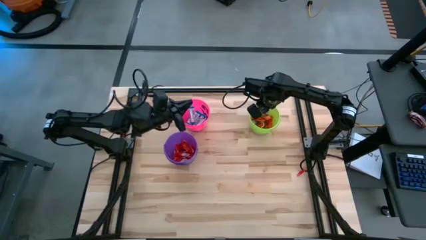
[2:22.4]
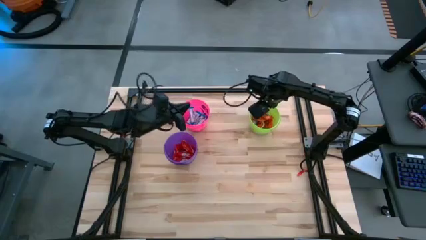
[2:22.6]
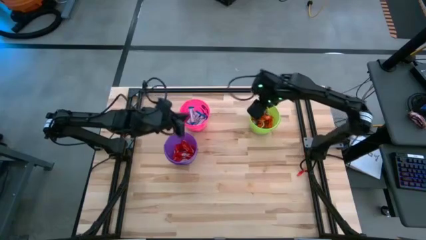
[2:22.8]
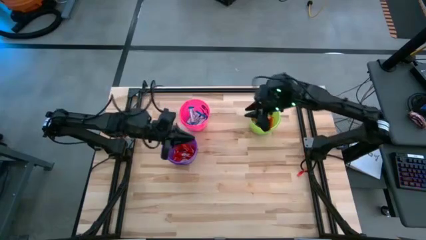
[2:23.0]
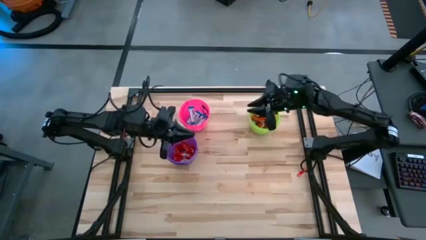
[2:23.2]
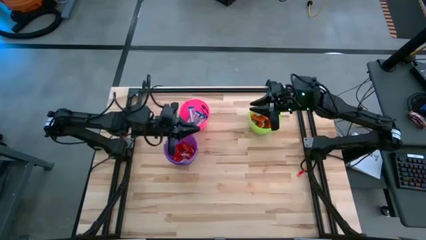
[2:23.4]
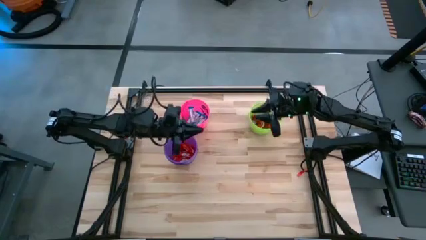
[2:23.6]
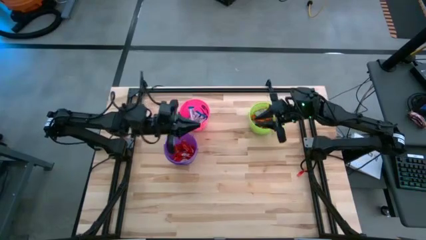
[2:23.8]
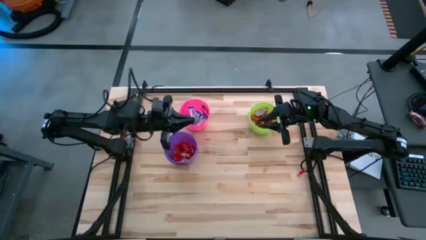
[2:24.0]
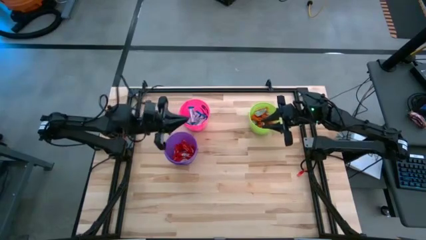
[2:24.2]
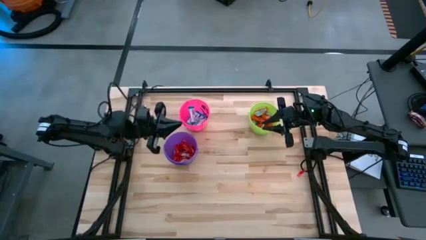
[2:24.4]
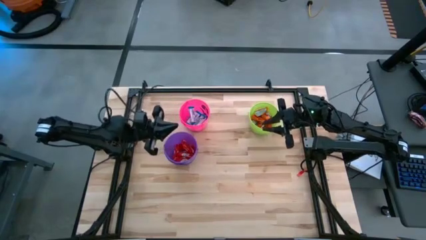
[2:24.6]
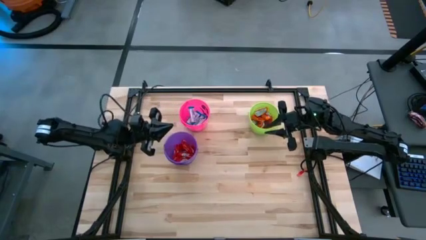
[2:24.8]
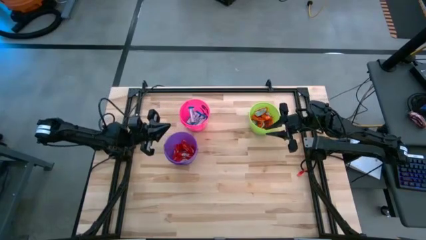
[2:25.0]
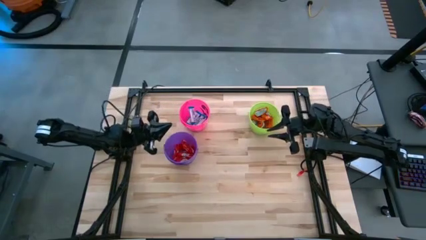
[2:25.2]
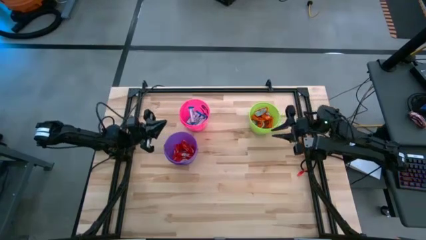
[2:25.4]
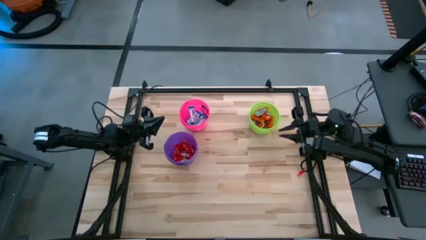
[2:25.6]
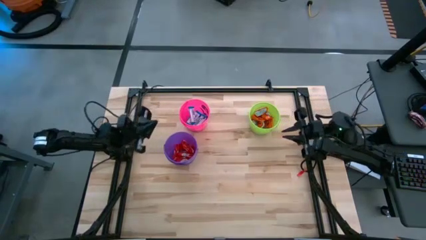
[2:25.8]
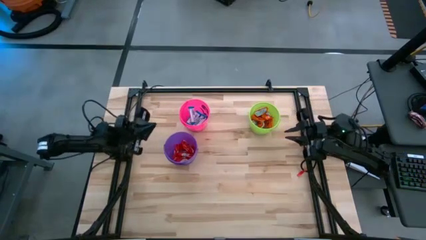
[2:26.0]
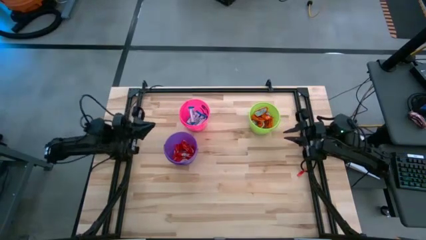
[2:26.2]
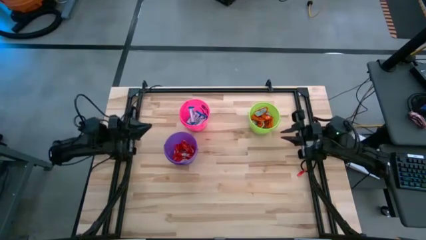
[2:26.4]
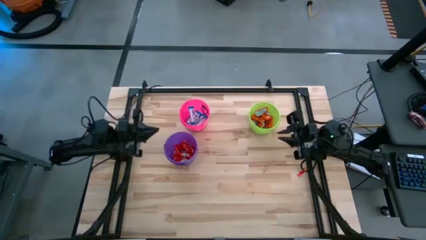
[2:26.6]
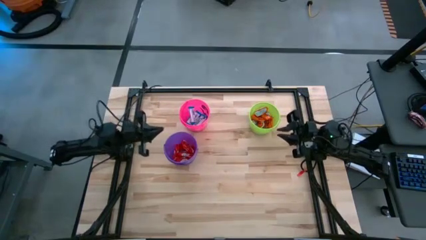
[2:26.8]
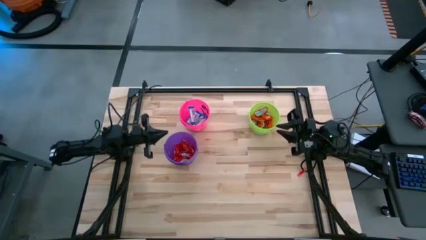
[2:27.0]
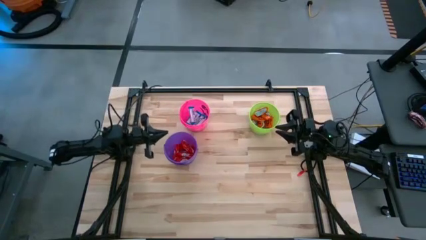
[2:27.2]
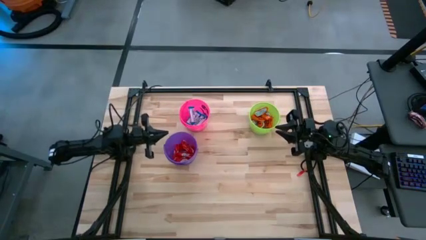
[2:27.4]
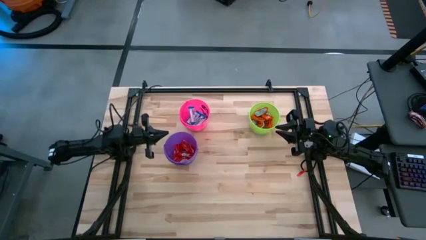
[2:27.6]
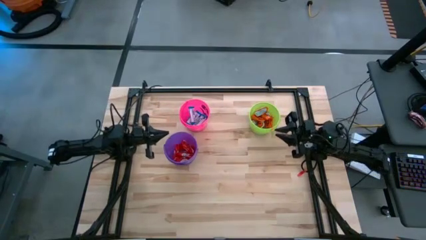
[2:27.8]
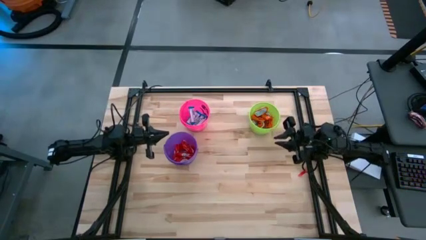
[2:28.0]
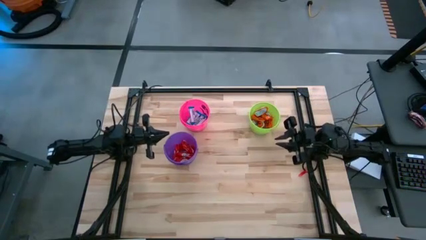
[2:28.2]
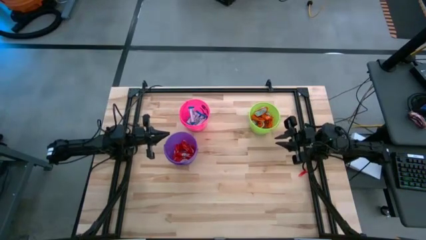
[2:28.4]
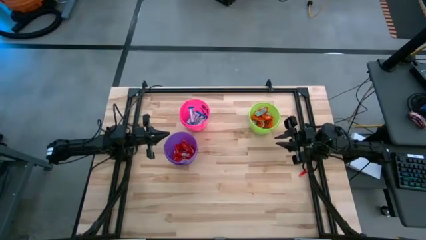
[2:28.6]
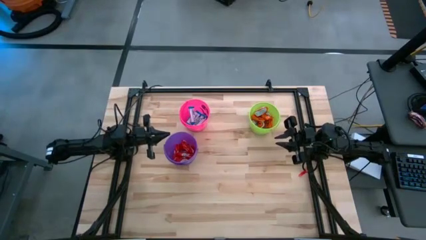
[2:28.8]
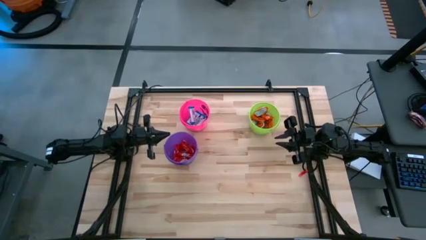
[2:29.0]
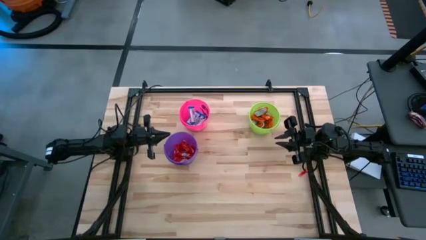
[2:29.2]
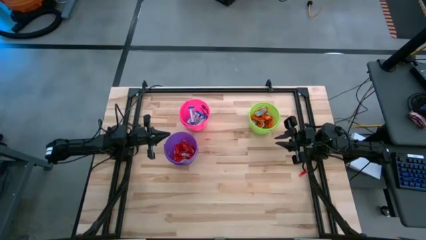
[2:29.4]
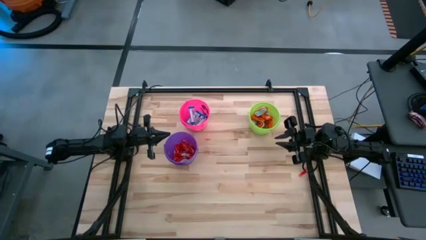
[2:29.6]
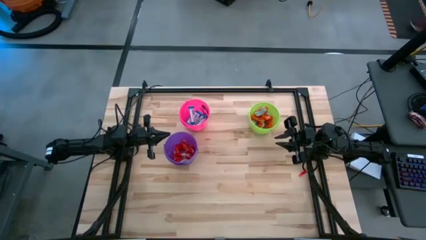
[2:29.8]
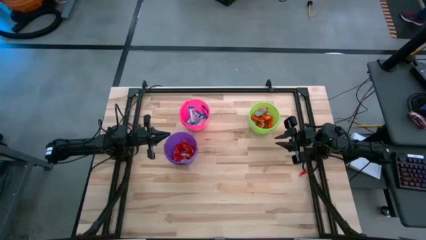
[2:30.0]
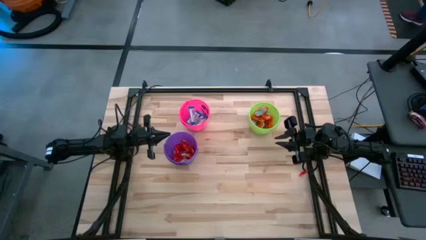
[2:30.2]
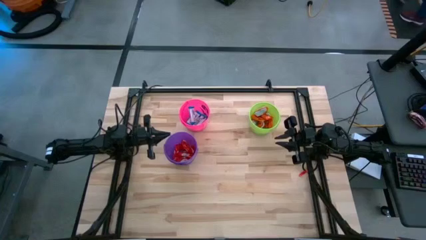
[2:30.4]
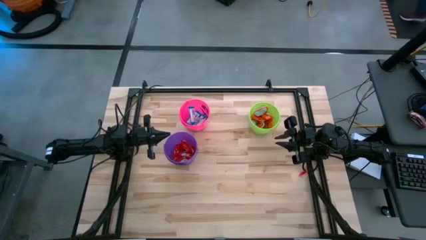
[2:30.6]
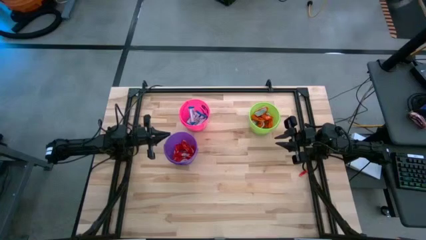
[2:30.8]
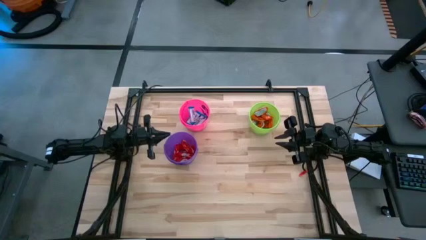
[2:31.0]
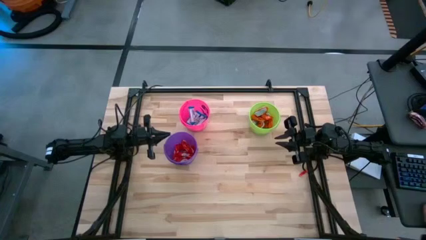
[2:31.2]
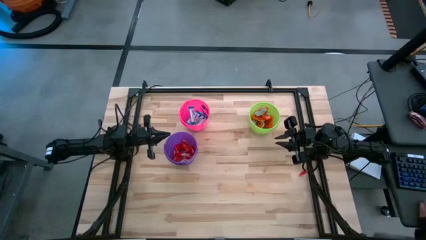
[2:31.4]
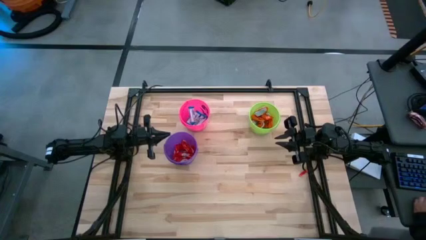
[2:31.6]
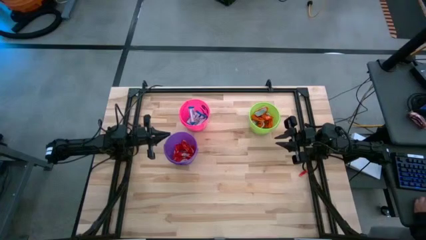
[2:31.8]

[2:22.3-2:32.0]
Task: Sort candy
Return to Home Position

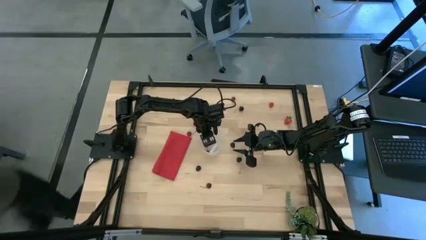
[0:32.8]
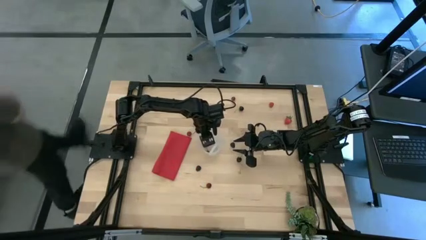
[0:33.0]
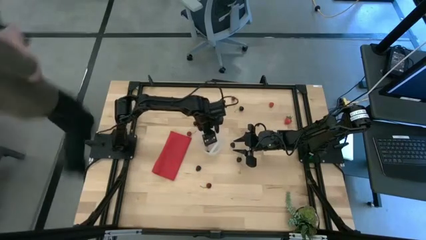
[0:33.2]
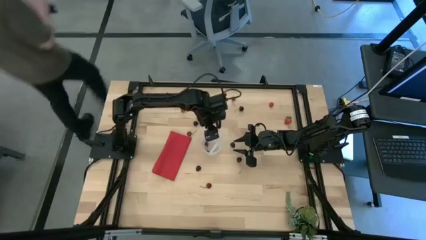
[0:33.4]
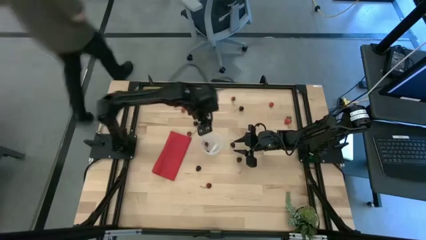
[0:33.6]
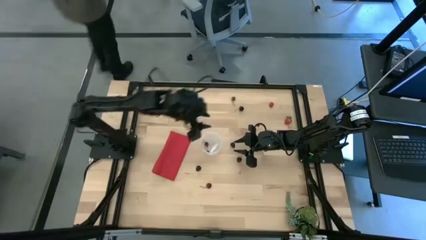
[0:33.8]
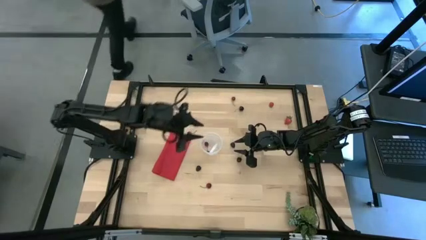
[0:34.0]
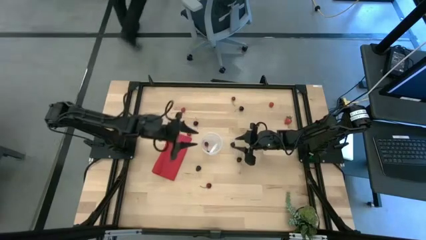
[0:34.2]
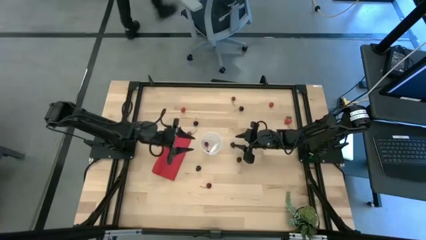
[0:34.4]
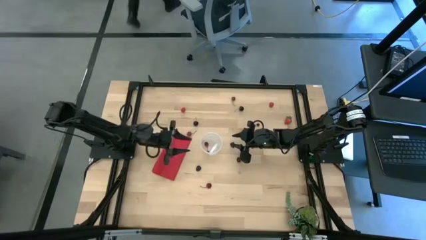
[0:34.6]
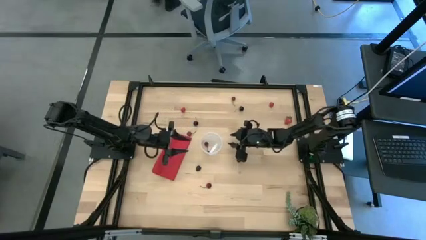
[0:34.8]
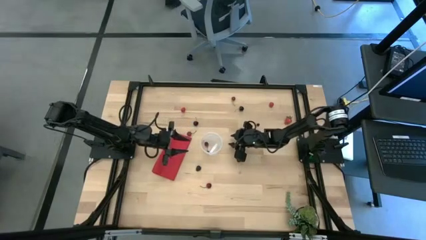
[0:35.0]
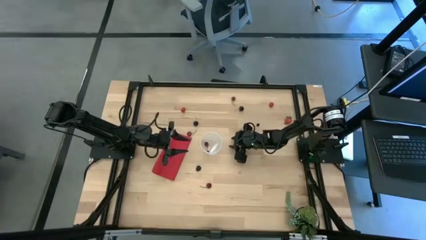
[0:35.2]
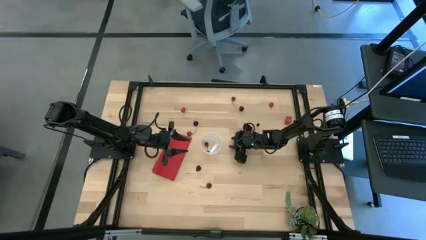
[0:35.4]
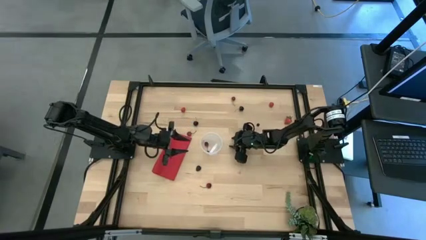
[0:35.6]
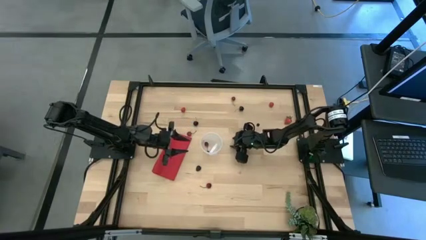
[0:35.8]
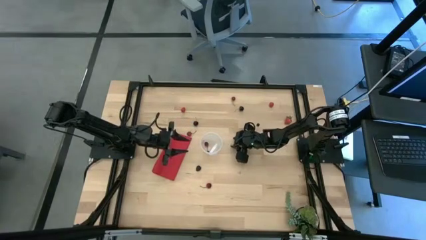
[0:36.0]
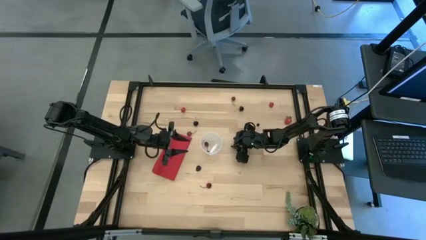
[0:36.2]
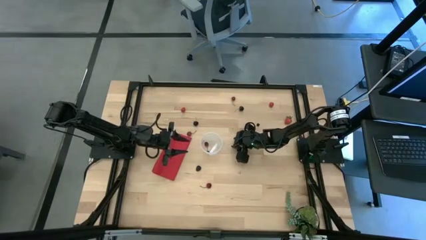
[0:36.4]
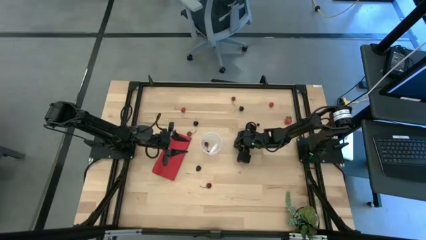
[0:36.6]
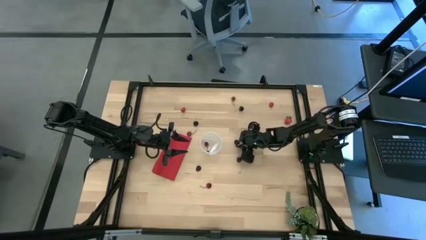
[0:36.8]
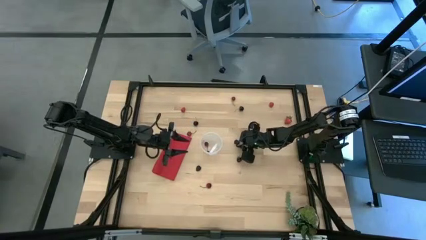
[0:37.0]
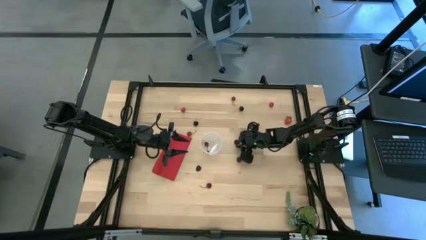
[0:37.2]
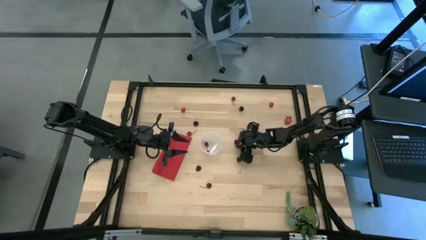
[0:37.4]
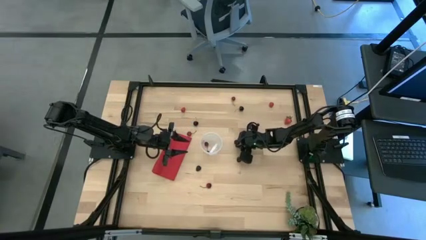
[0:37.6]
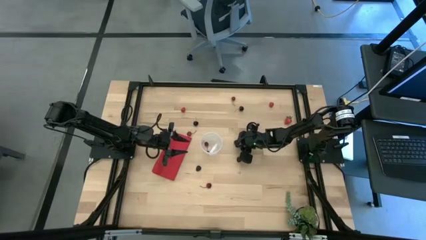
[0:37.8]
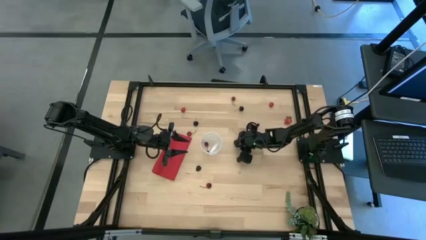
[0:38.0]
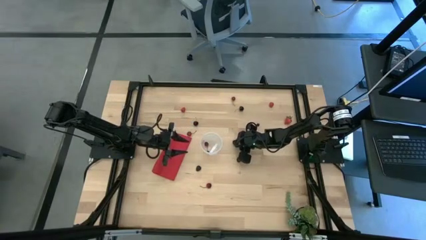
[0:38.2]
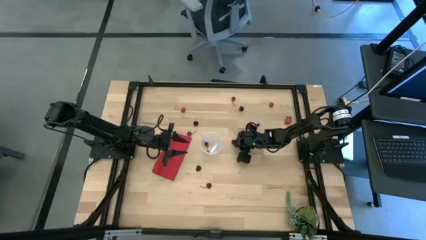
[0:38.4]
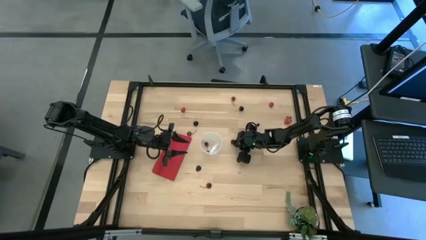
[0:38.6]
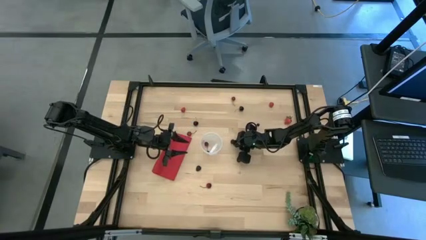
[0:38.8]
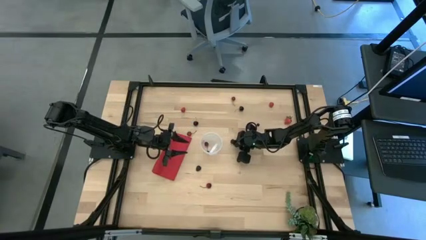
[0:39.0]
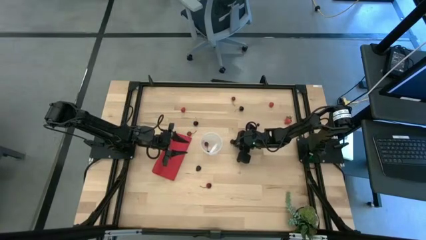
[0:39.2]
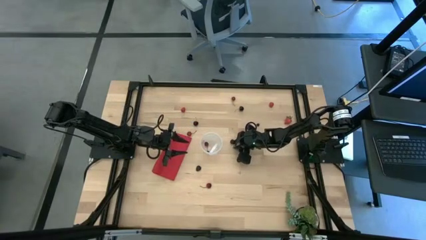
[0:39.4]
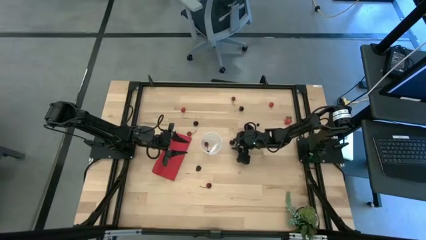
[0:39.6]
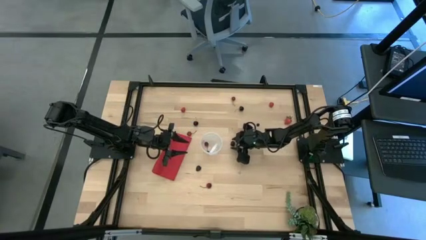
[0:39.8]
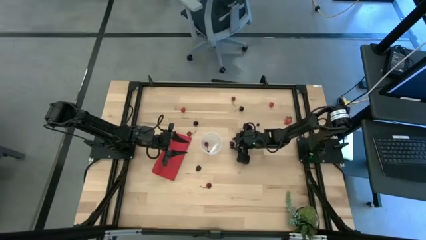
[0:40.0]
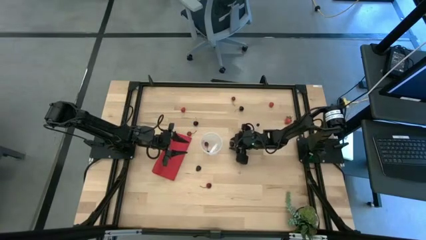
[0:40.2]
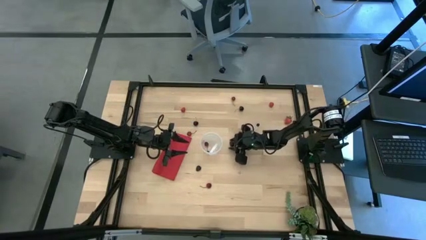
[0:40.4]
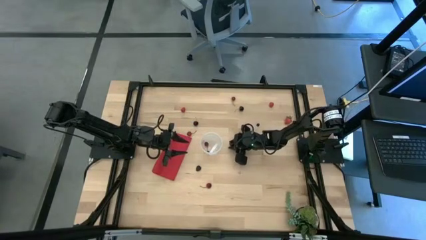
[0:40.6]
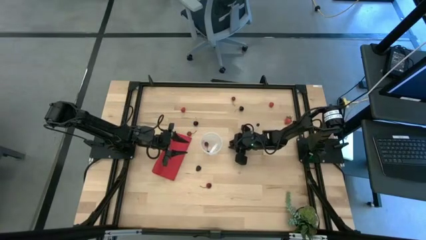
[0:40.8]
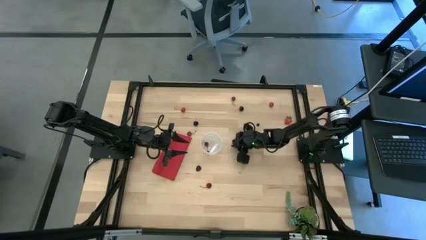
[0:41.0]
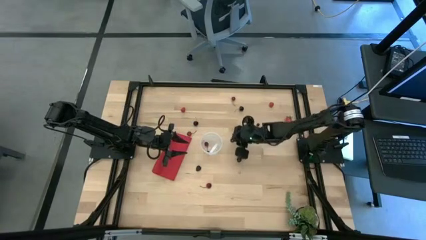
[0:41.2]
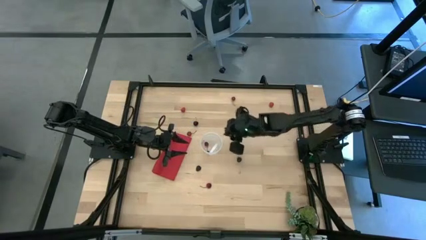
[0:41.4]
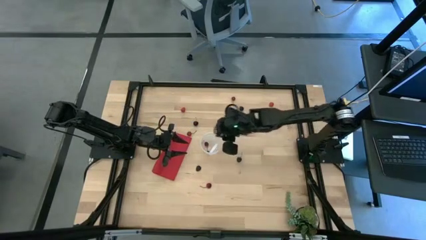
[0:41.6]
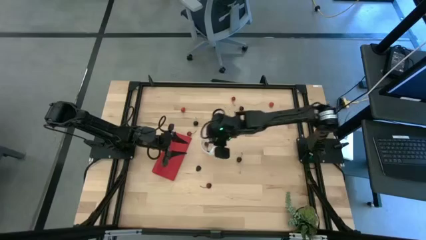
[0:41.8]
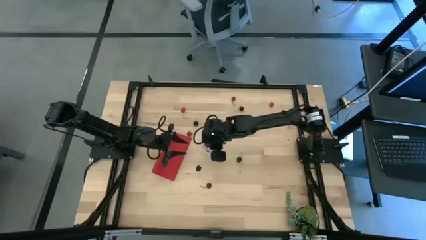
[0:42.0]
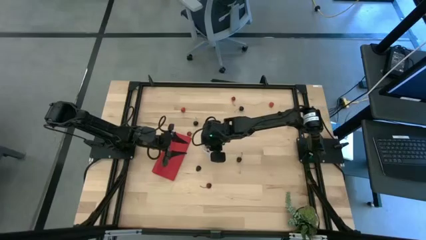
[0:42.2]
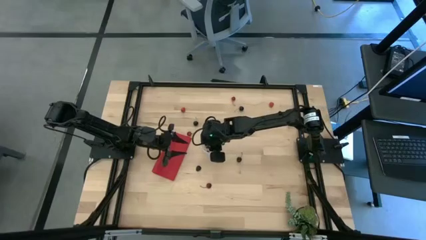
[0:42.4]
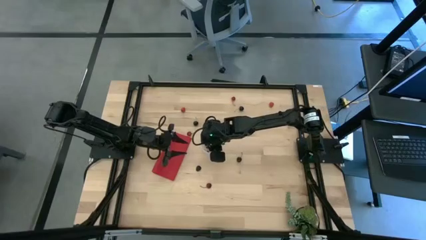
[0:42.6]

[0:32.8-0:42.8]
Task: Pick and placing Produce into tupperware
Put the blackberries into the transparent bin
